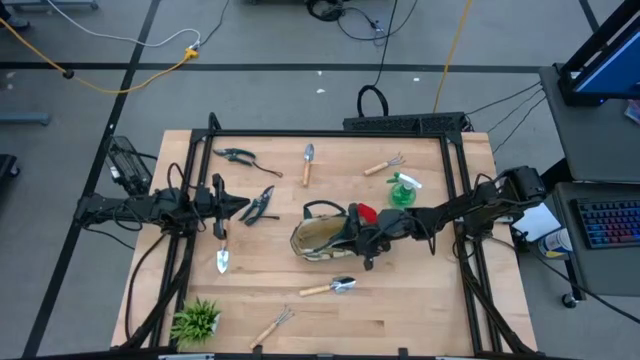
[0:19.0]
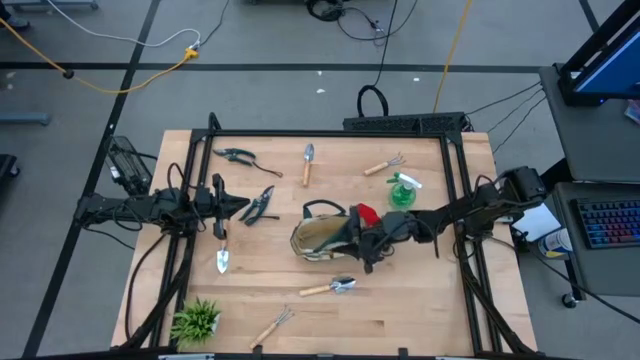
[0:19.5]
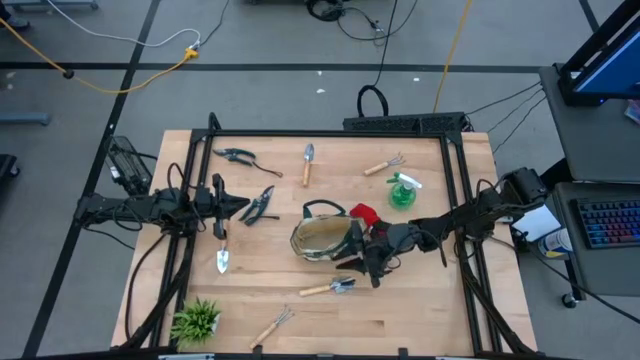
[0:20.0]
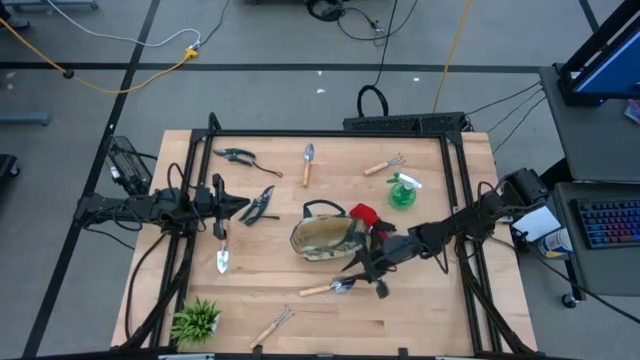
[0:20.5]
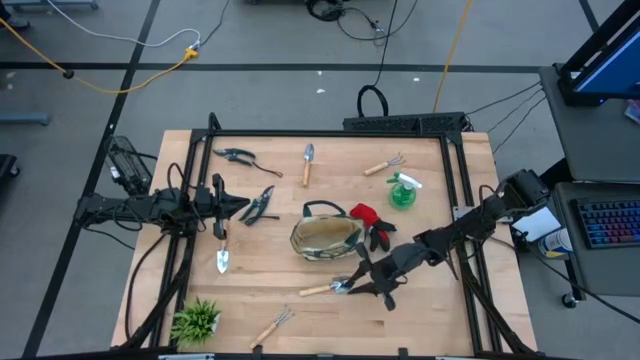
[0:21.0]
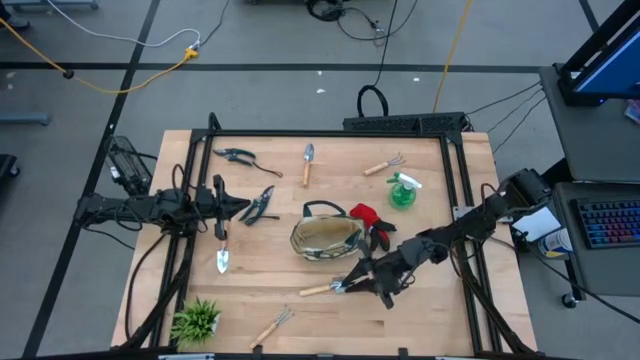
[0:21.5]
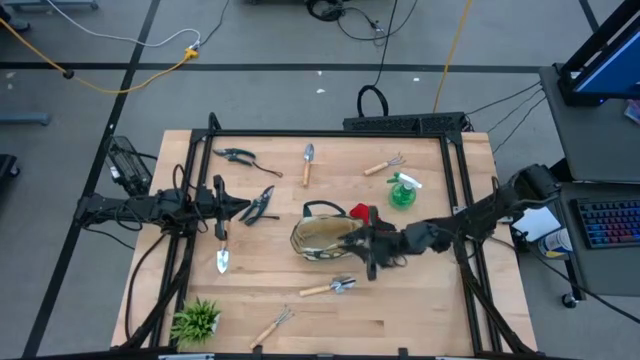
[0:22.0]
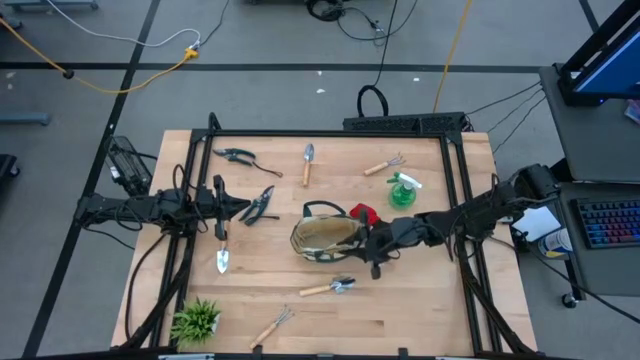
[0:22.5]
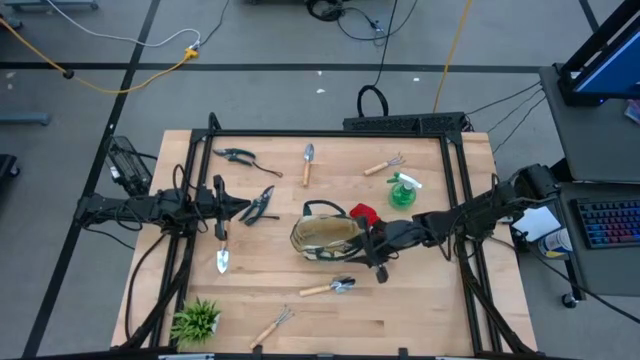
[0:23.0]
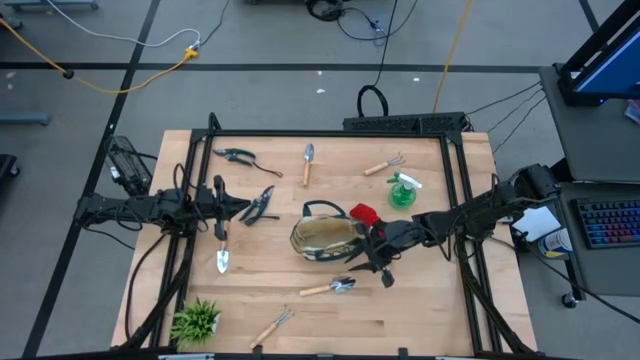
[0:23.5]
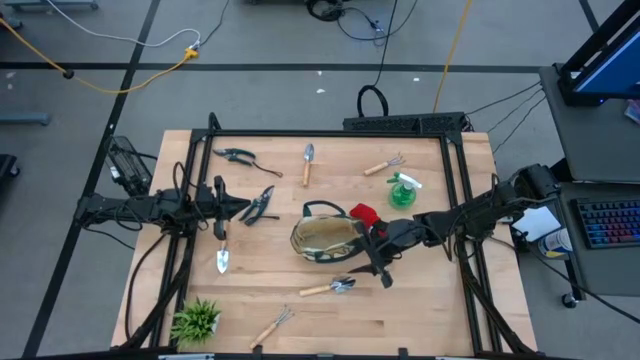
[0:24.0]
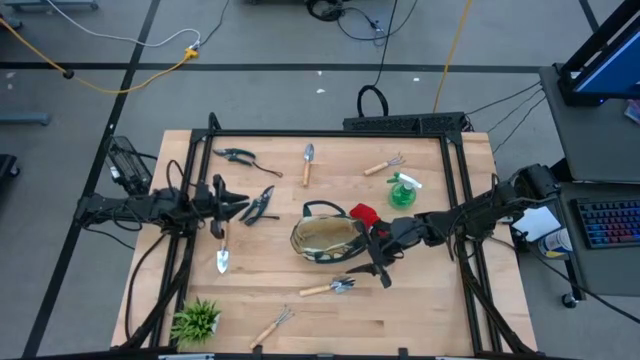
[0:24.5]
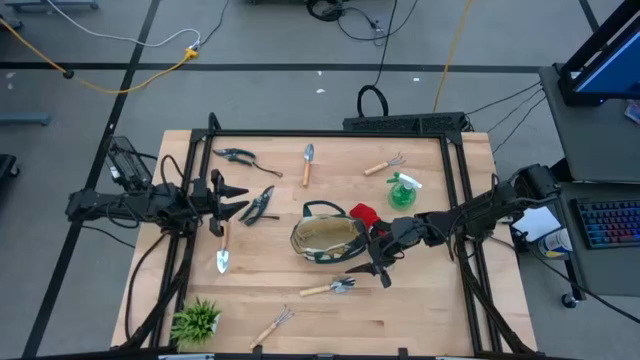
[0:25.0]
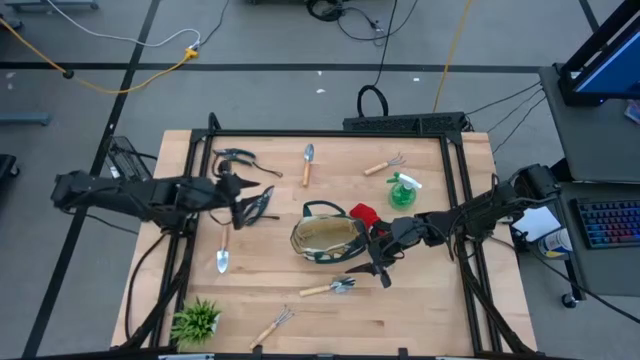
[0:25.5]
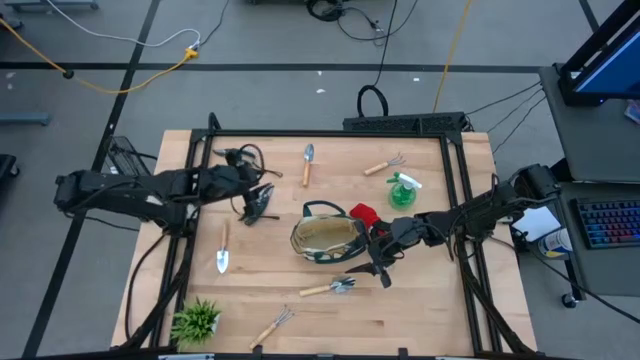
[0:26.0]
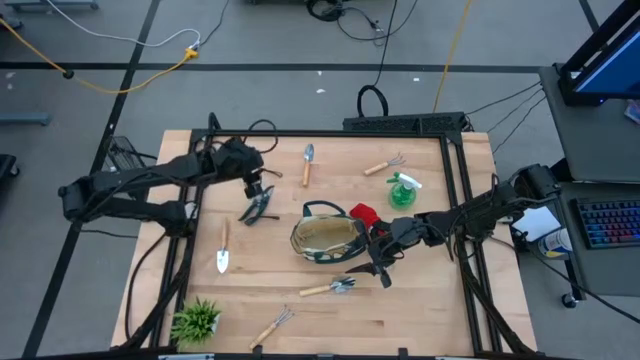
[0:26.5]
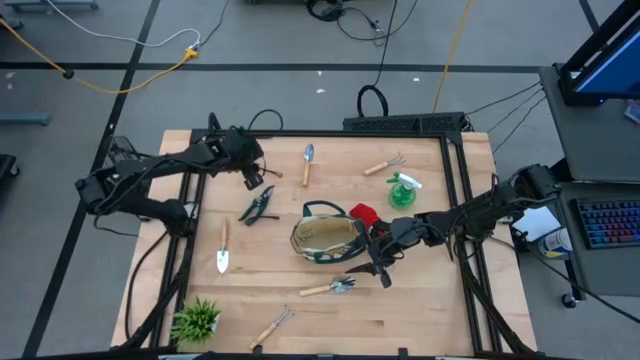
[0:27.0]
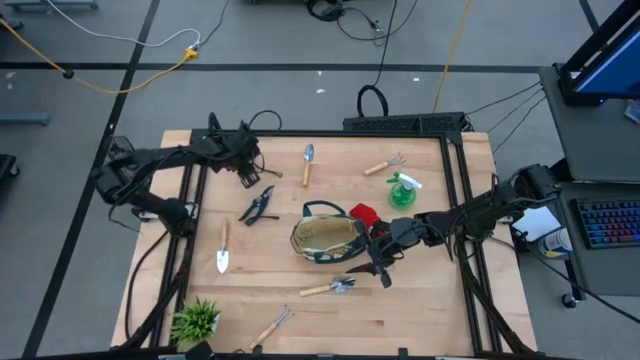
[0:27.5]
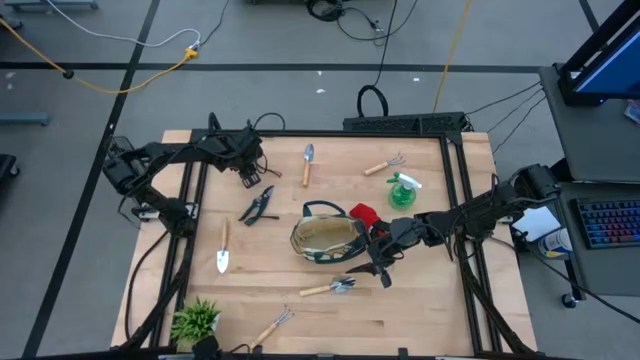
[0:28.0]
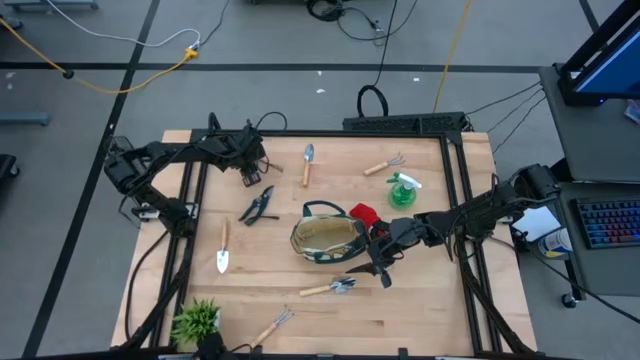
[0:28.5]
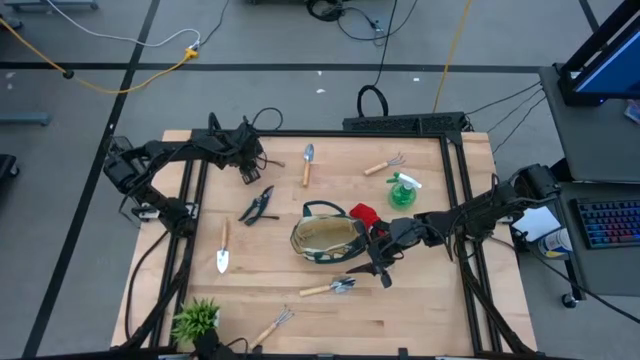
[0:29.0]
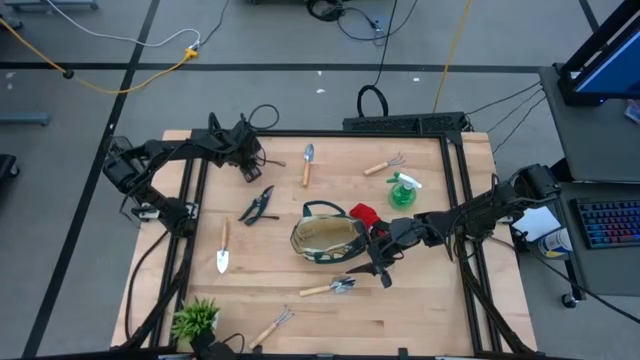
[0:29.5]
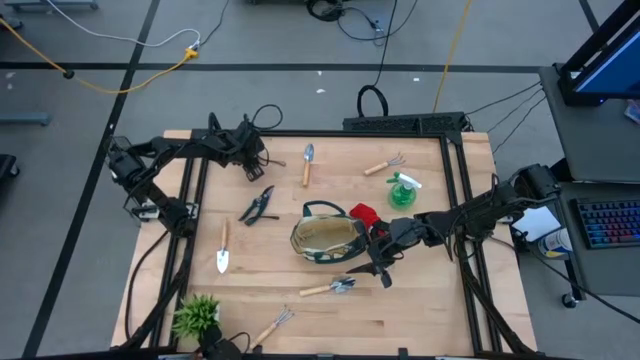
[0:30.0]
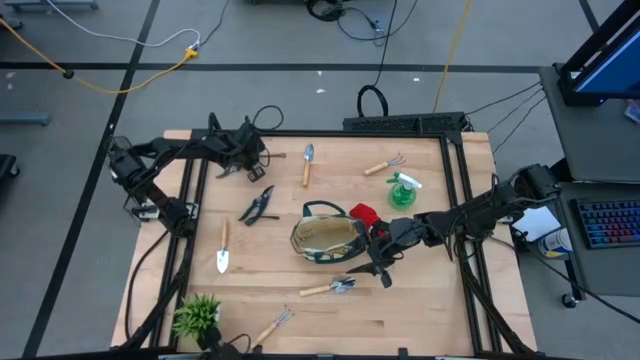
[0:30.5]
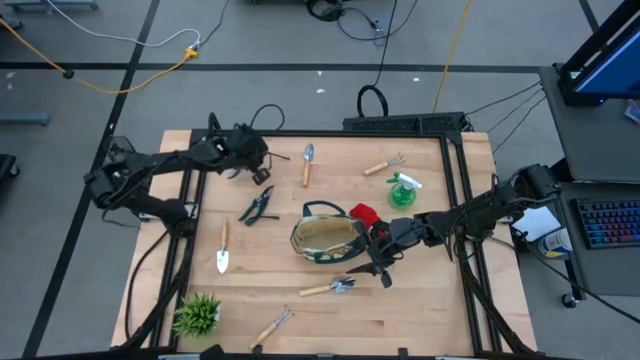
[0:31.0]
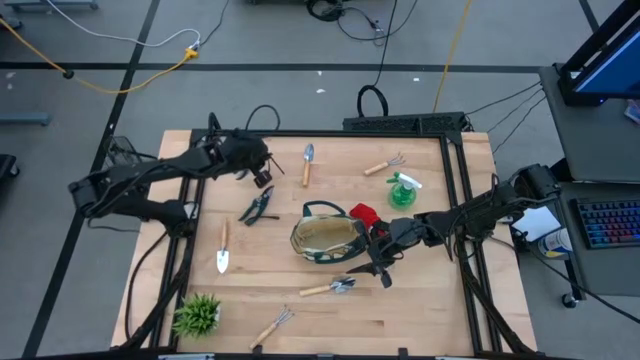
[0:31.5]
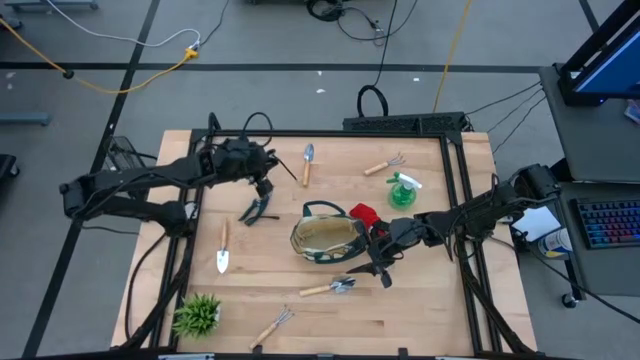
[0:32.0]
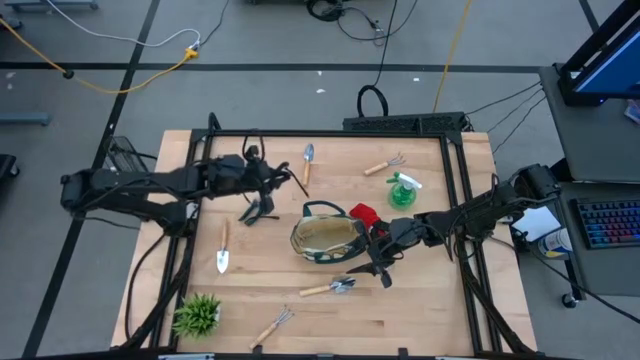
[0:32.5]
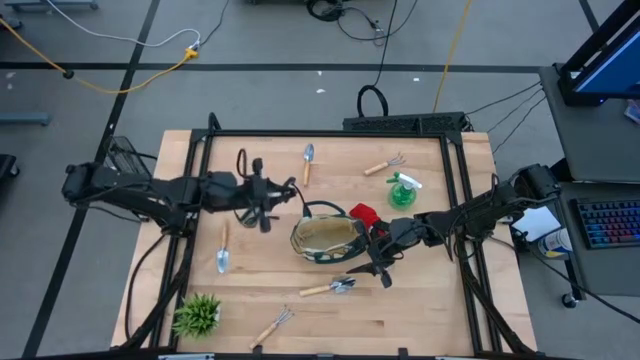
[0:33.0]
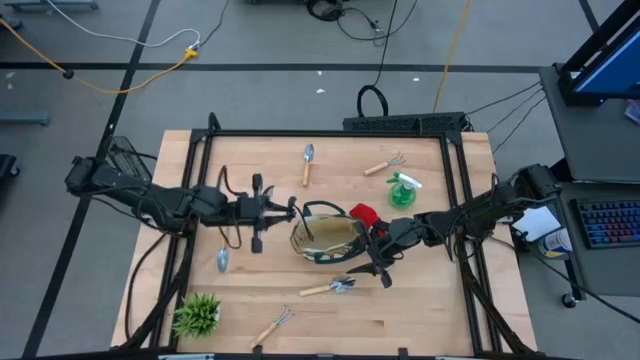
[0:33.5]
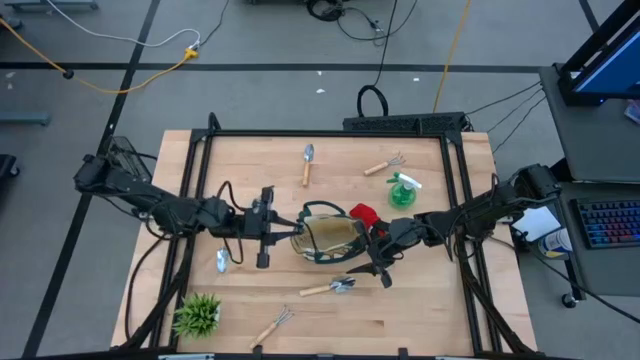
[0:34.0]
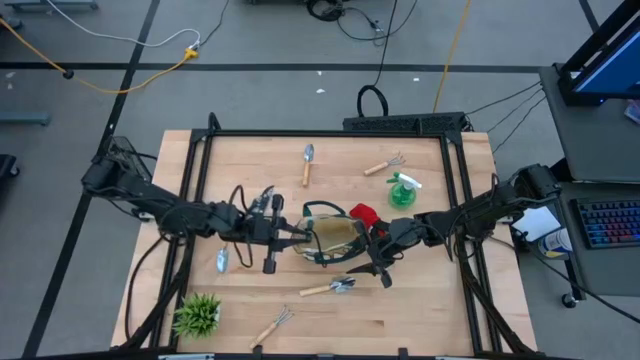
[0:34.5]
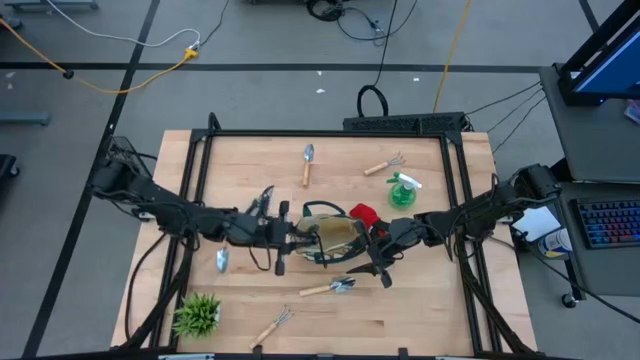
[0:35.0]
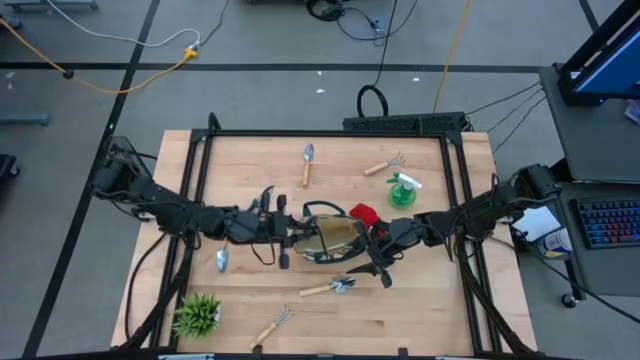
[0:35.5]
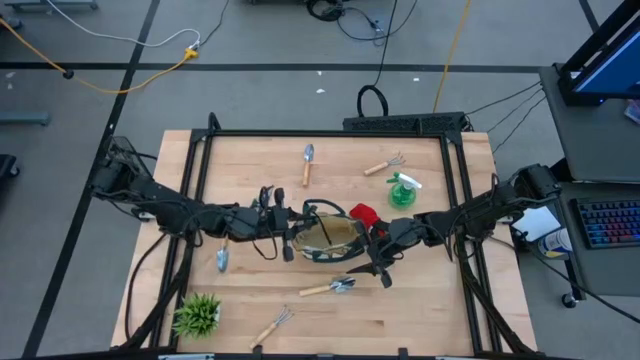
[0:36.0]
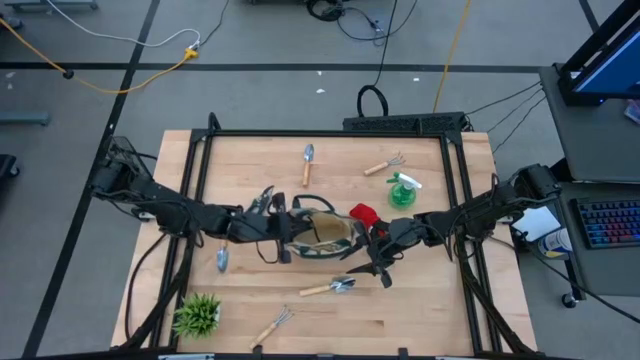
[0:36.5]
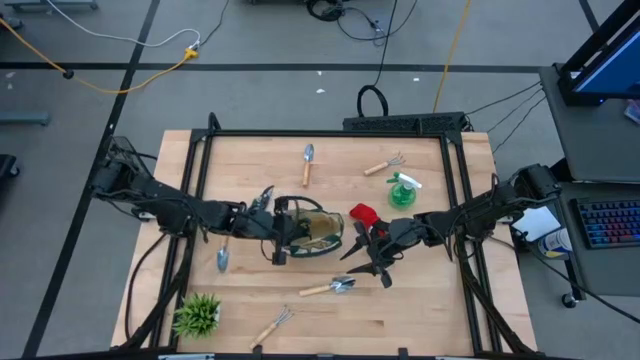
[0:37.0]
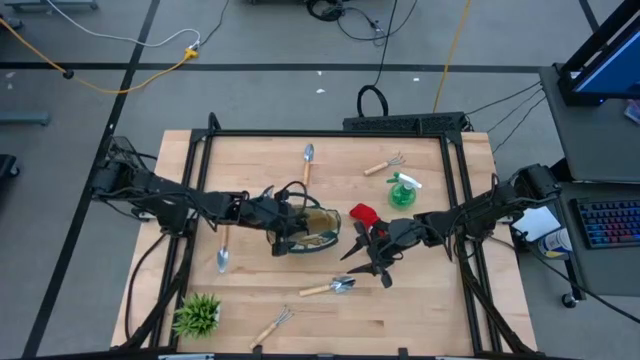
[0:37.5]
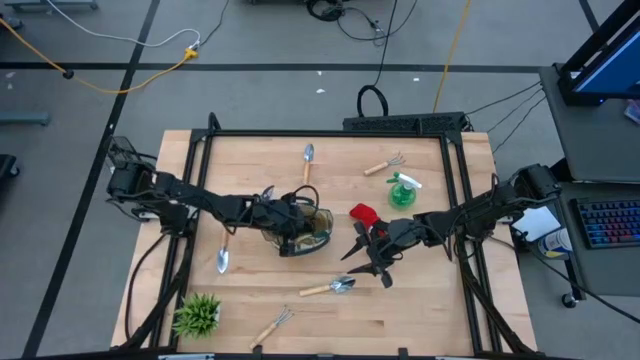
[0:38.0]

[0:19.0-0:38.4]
Task: Pick & Place Garden tools in Gardening bag
Put the top brown shears into the green gardening bag

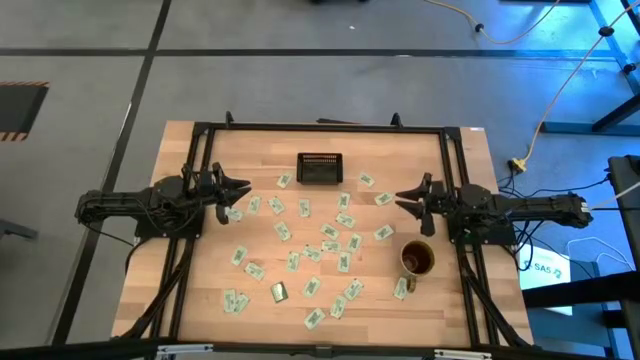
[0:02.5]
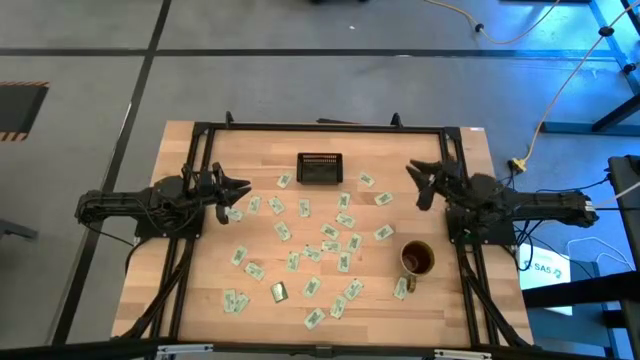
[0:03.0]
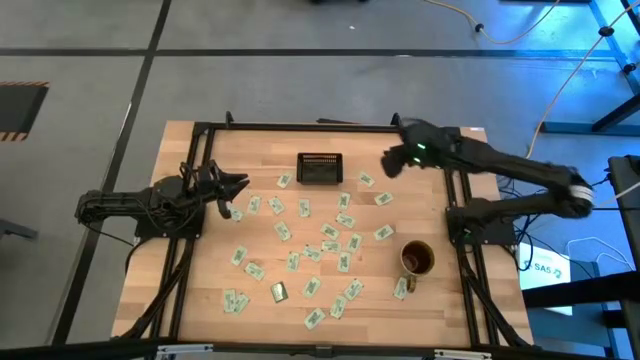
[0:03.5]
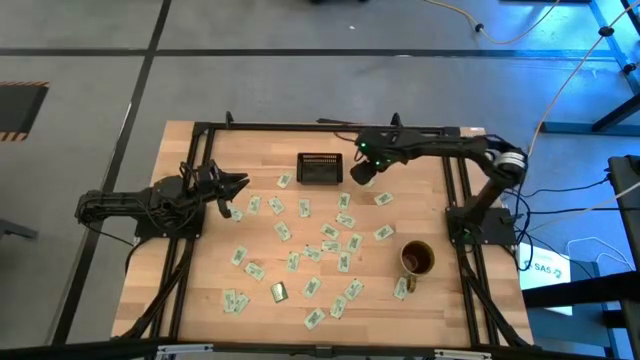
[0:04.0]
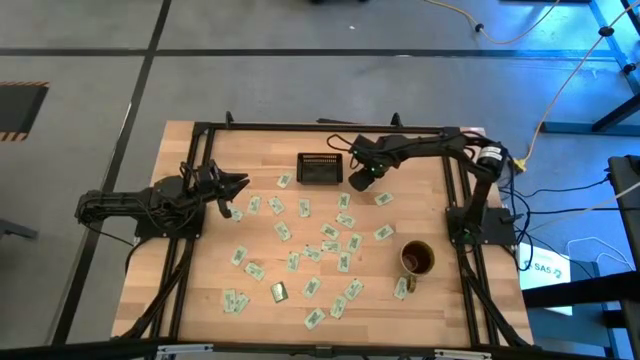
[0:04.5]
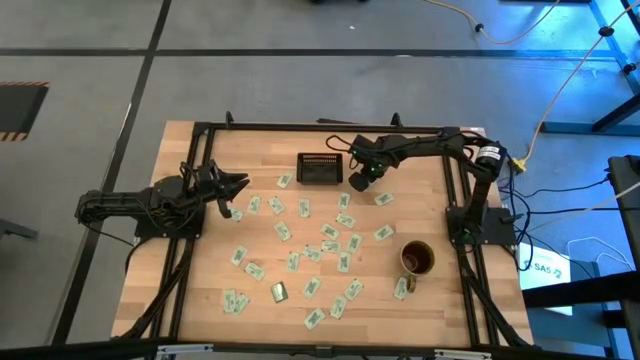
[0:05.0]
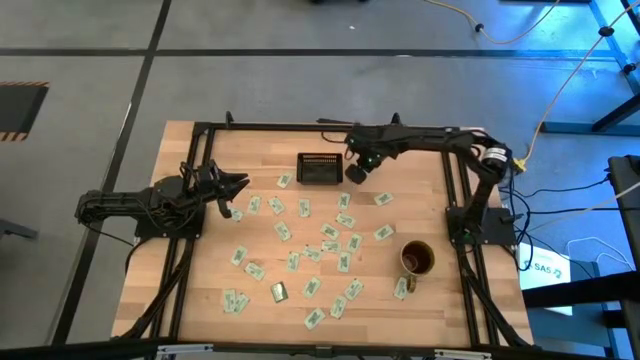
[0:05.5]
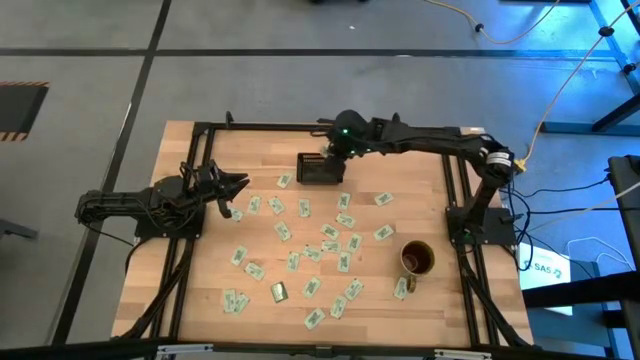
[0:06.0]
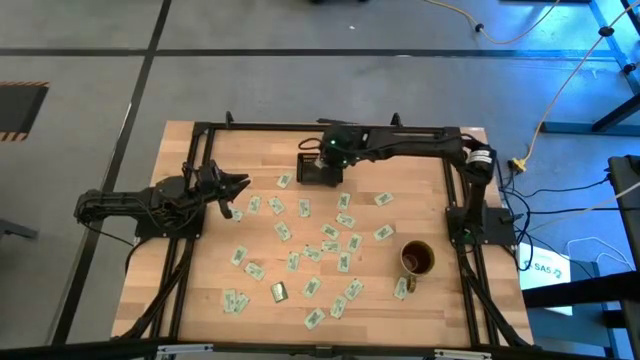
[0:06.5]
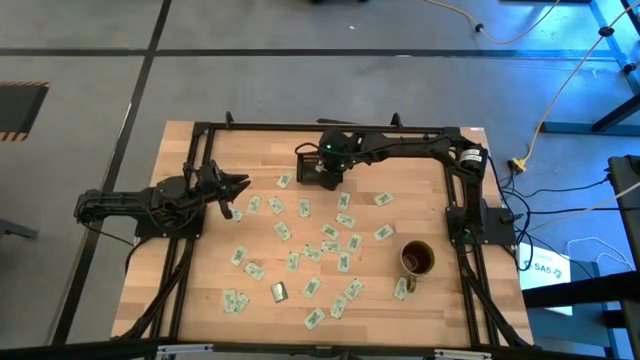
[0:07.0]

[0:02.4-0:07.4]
Task: Pick and place Stevia / Truvia into bins
Put the white stevia packet into the black bin
